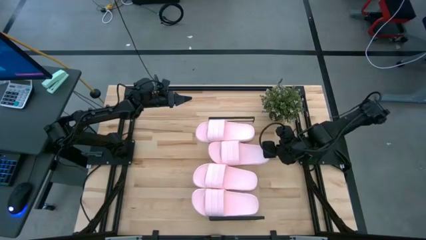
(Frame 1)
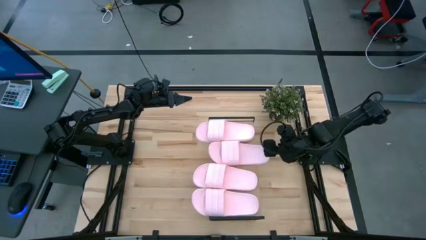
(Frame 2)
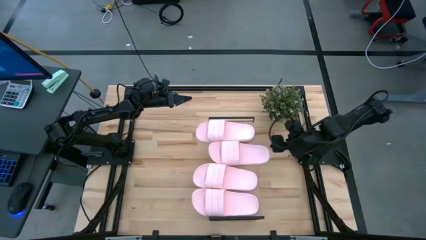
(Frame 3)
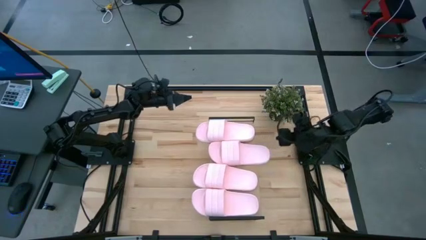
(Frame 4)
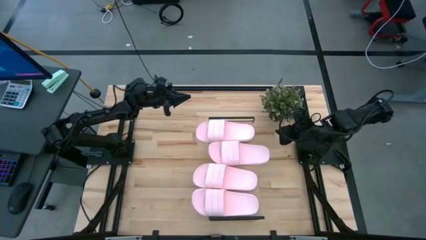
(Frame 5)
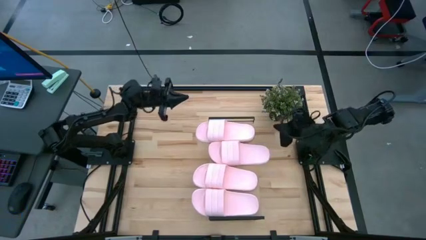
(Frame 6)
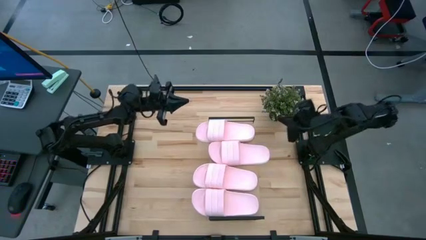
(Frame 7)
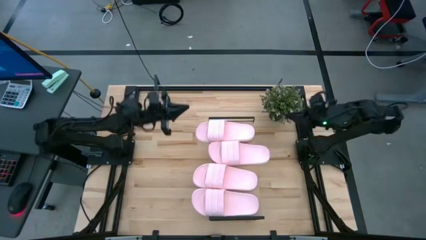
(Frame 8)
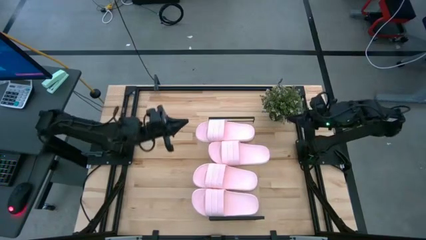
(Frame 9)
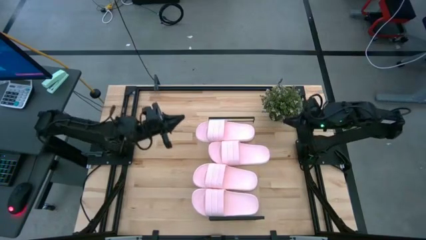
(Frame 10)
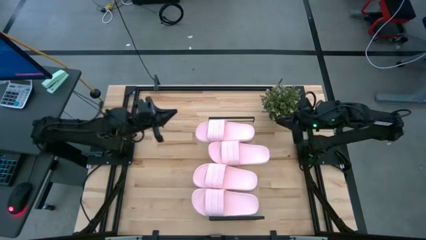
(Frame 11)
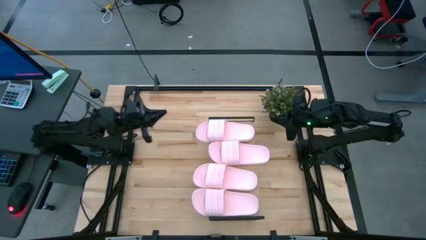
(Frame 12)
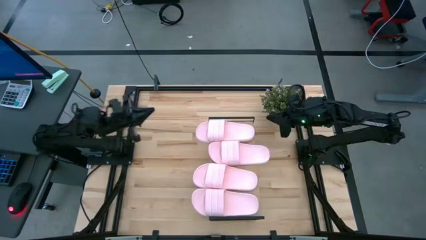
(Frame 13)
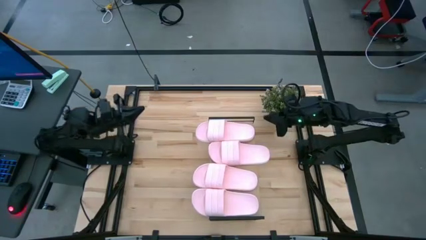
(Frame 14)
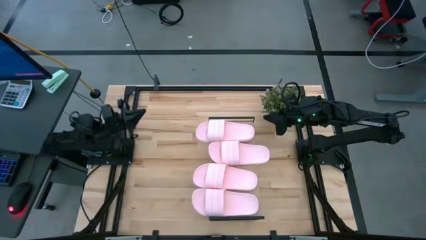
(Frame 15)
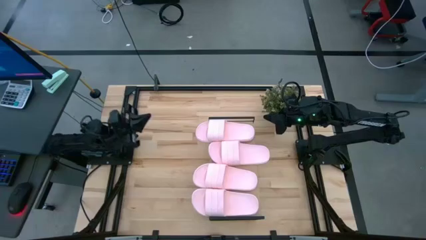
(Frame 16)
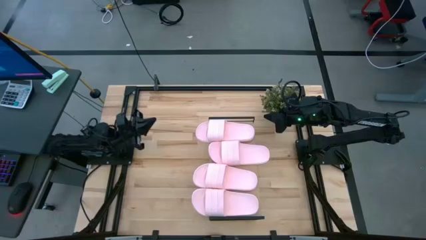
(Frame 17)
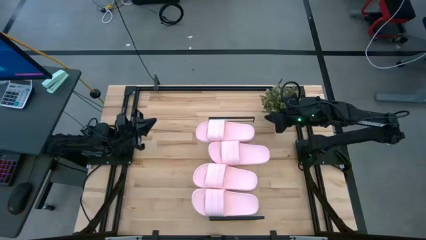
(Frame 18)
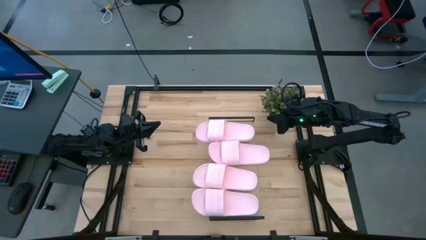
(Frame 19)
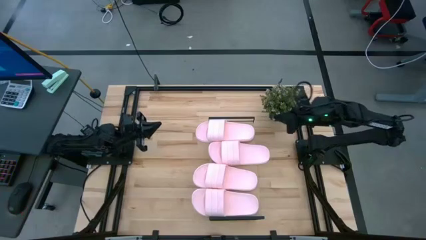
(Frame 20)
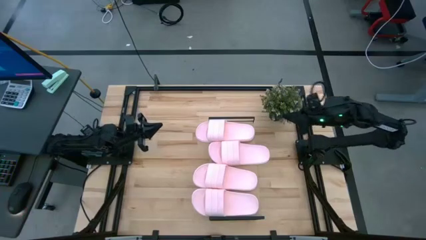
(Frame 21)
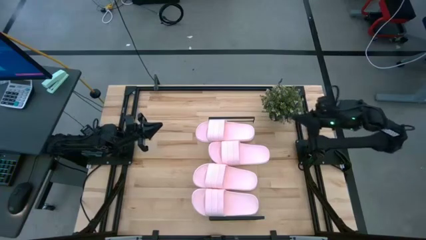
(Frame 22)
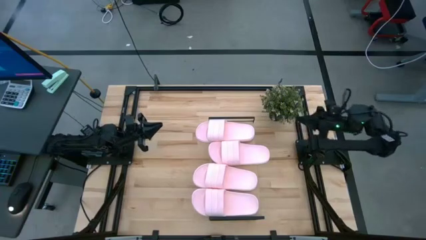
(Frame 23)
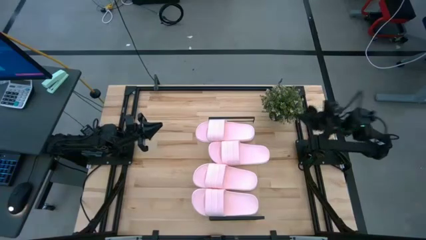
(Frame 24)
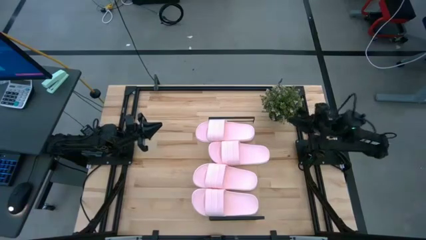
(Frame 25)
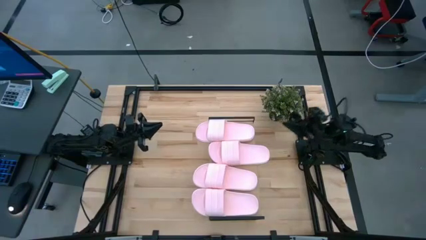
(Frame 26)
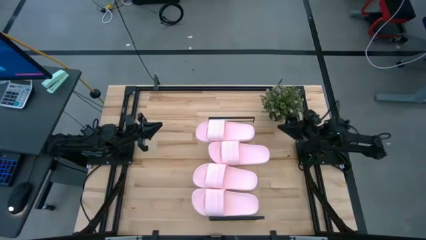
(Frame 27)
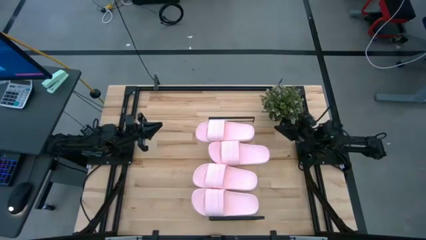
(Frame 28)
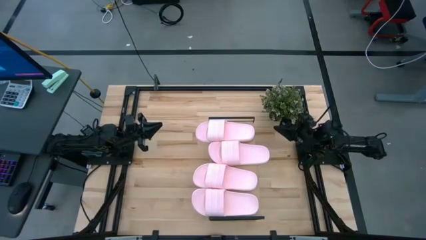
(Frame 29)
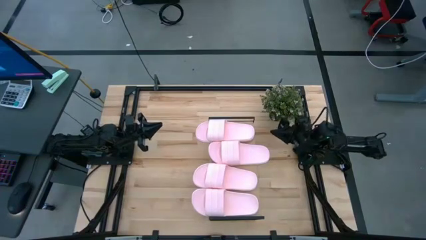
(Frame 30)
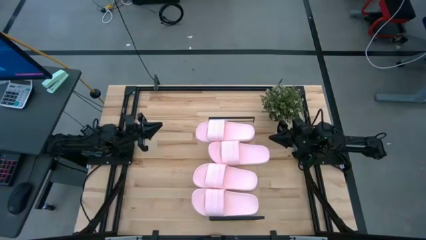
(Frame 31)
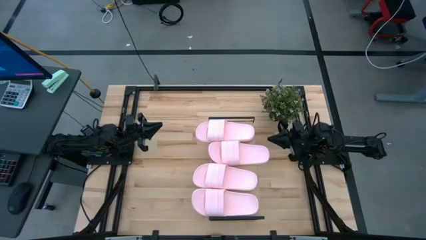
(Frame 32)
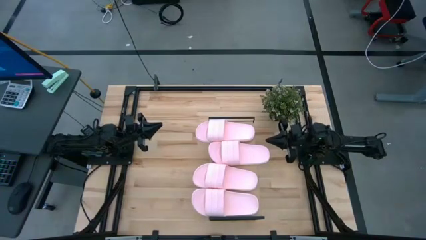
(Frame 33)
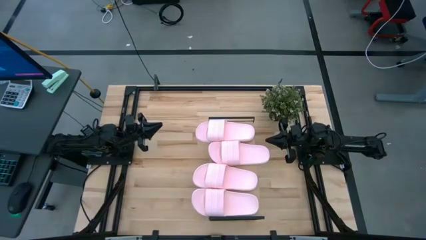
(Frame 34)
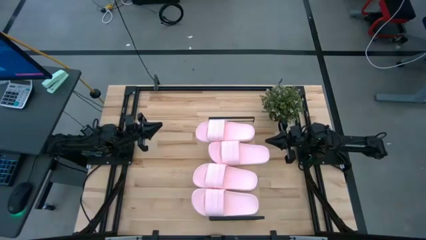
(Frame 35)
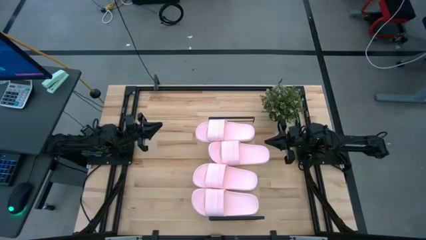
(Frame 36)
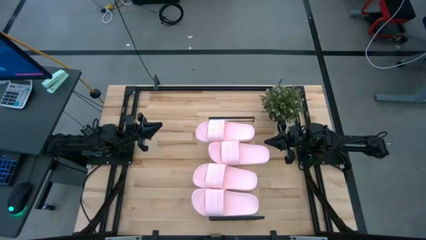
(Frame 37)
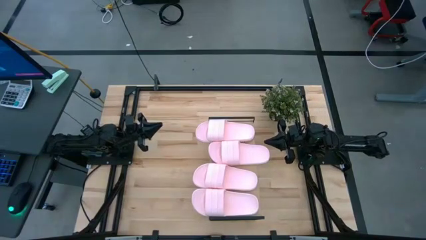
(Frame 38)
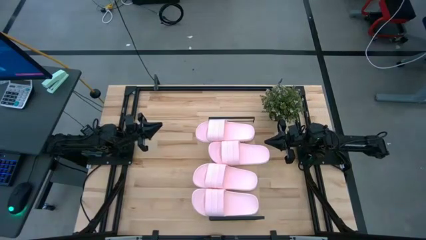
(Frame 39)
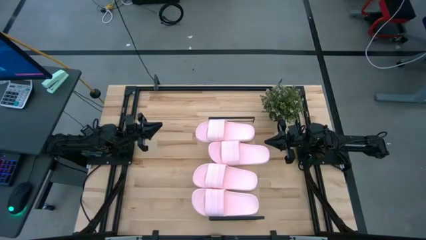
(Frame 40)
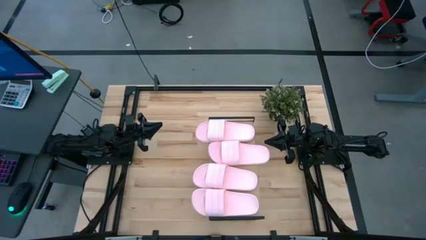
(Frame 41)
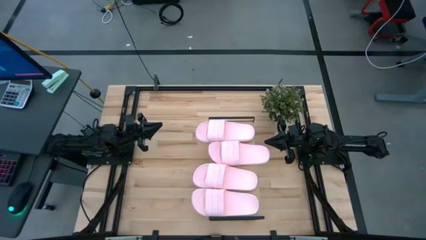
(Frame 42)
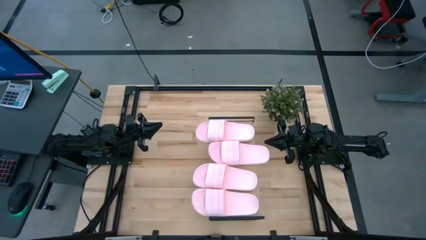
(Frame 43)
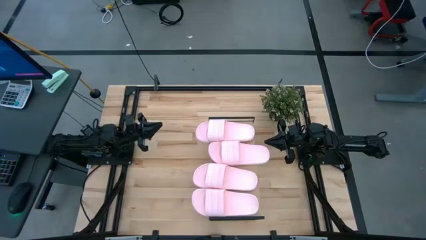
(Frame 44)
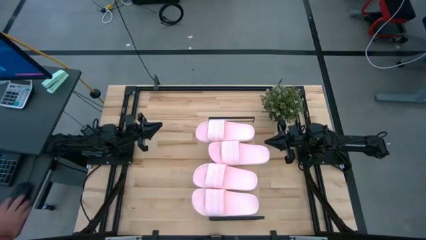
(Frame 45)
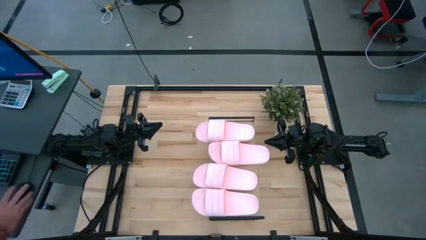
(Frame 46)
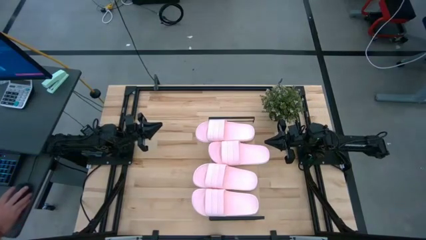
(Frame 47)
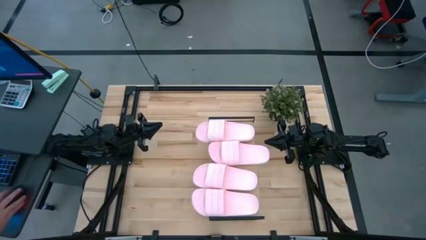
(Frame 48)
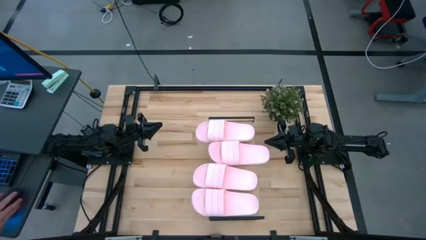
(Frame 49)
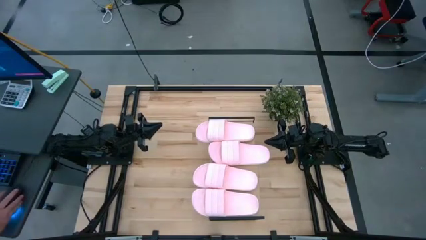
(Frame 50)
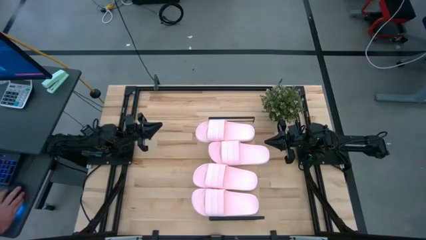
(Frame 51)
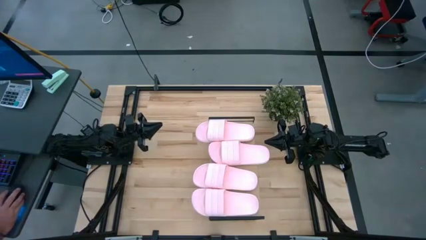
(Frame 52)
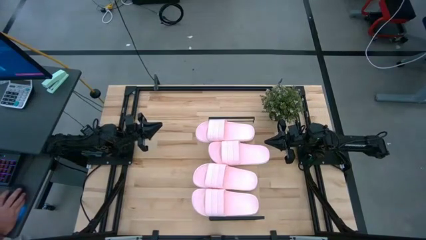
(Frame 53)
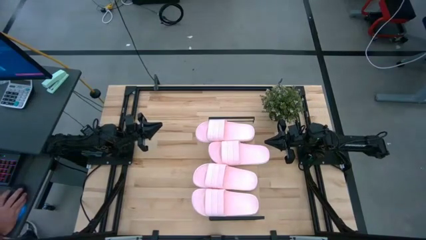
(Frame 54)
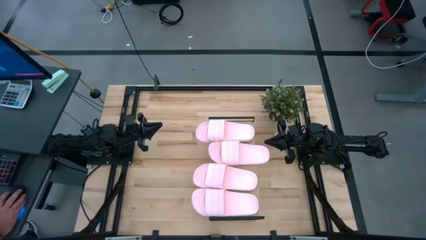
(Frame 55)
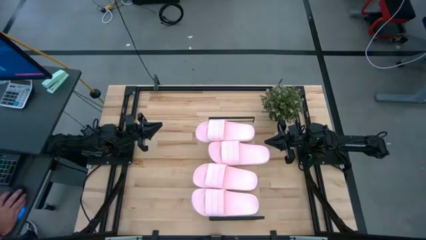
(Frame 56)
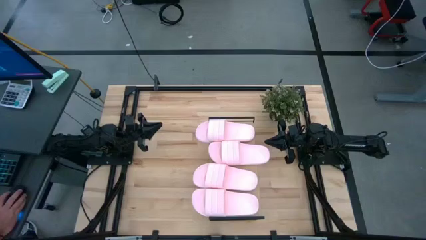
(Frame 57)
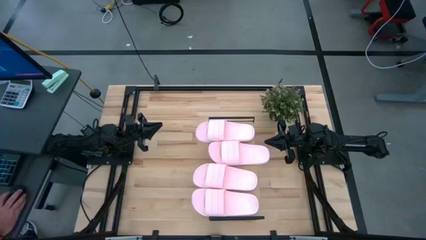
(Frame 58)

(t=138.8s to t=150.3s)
Task: Pick and place slides into the shelf
Return to Home Position
